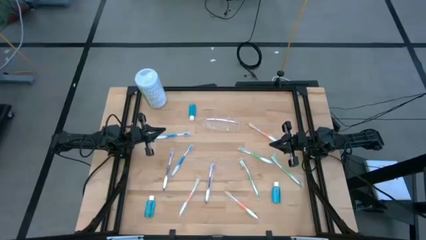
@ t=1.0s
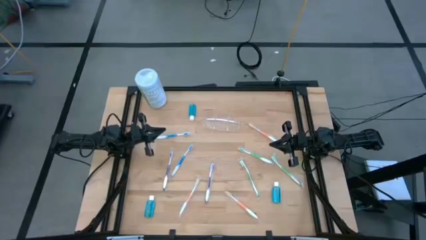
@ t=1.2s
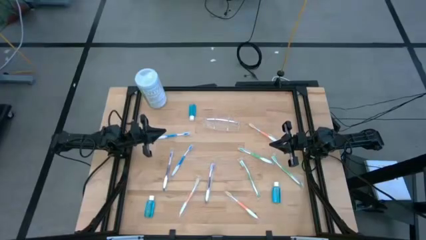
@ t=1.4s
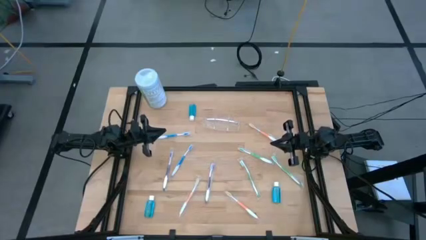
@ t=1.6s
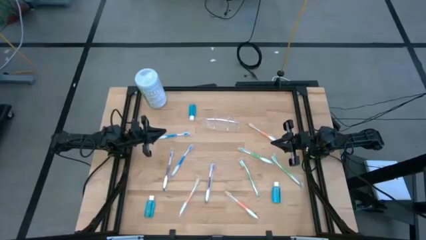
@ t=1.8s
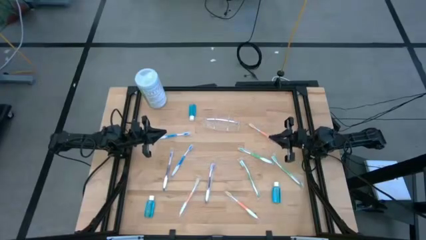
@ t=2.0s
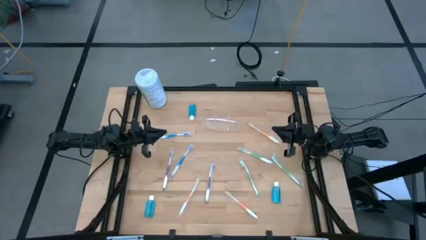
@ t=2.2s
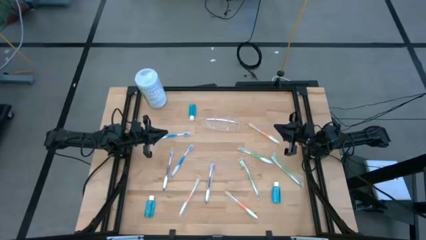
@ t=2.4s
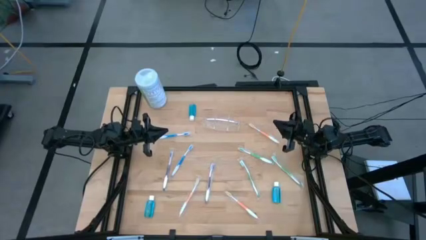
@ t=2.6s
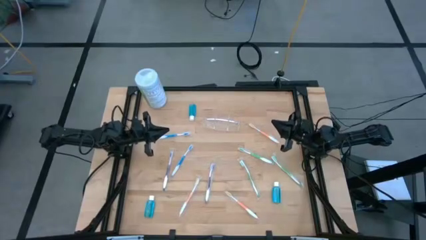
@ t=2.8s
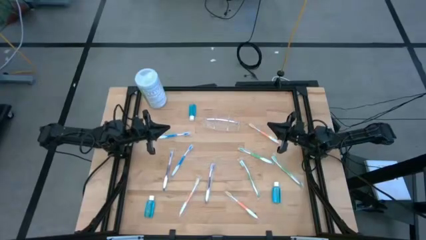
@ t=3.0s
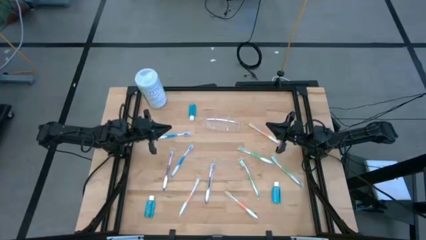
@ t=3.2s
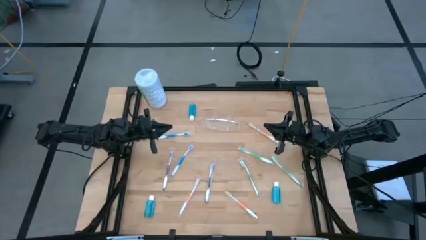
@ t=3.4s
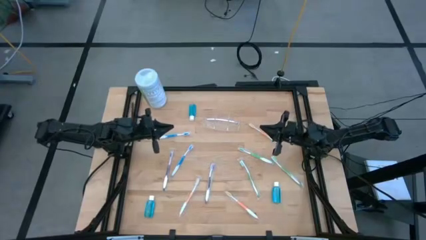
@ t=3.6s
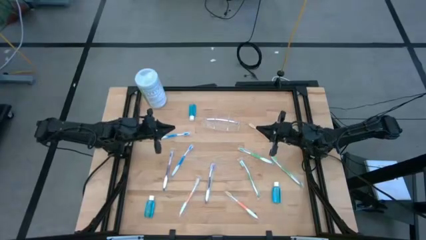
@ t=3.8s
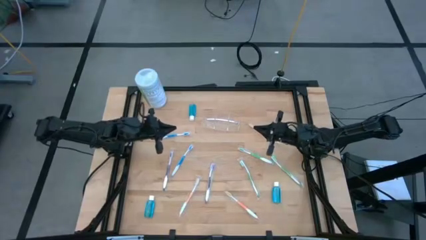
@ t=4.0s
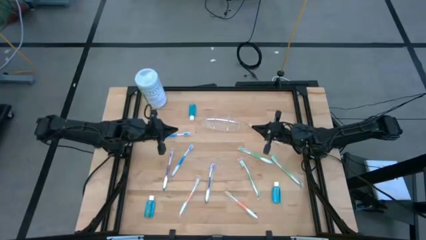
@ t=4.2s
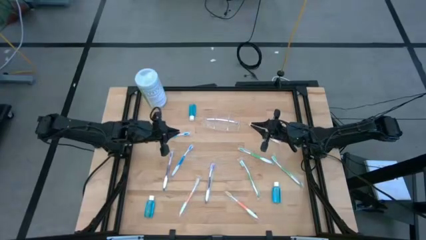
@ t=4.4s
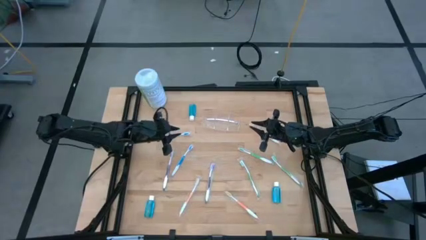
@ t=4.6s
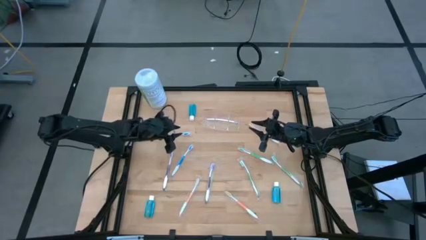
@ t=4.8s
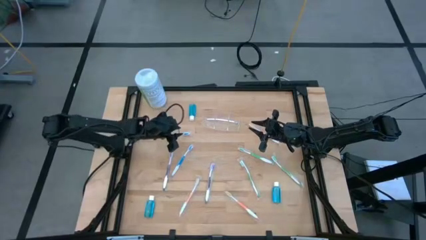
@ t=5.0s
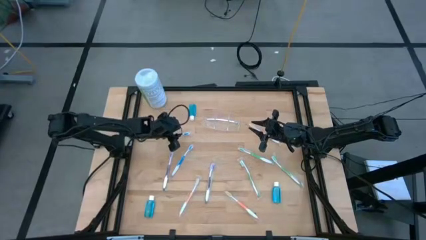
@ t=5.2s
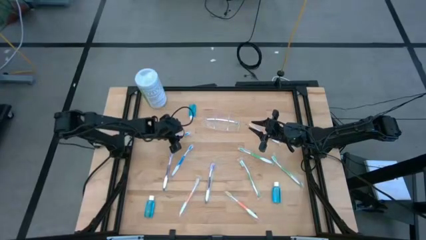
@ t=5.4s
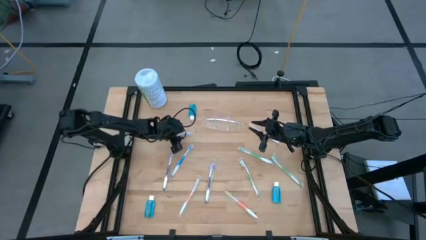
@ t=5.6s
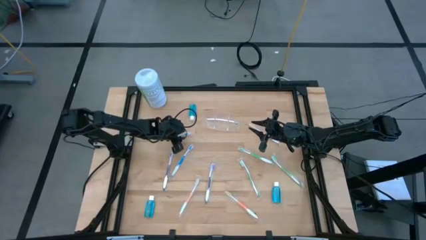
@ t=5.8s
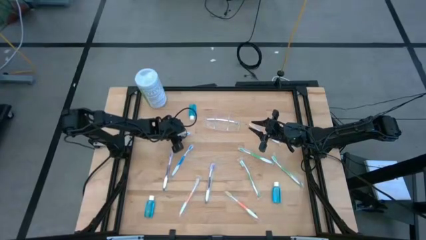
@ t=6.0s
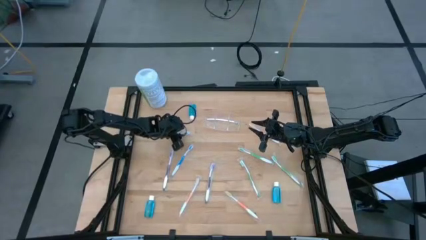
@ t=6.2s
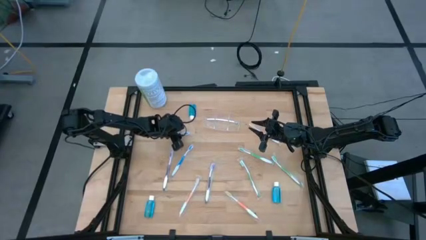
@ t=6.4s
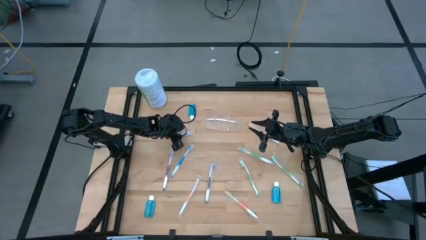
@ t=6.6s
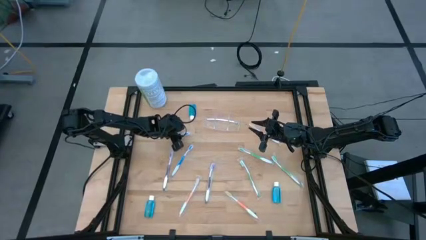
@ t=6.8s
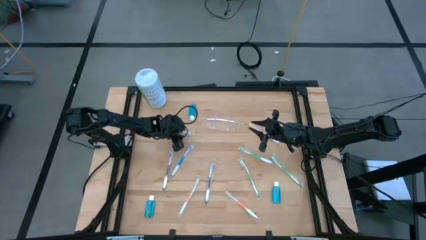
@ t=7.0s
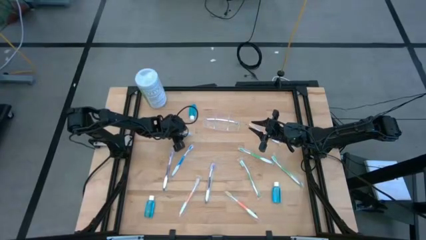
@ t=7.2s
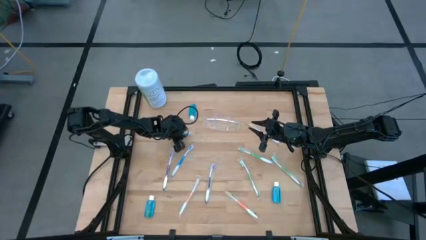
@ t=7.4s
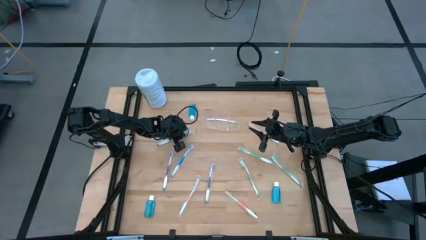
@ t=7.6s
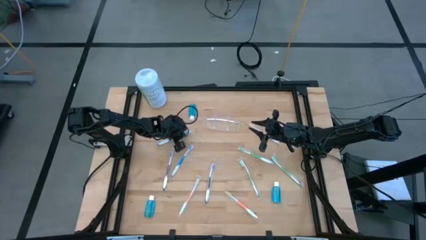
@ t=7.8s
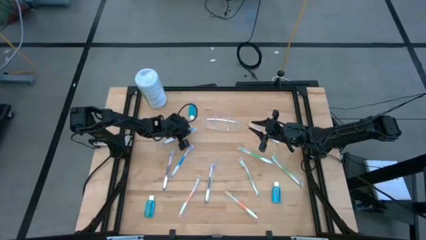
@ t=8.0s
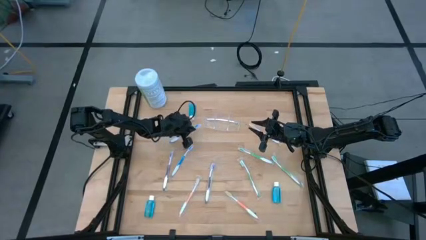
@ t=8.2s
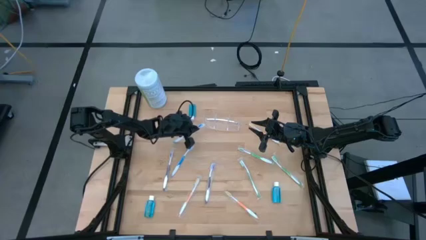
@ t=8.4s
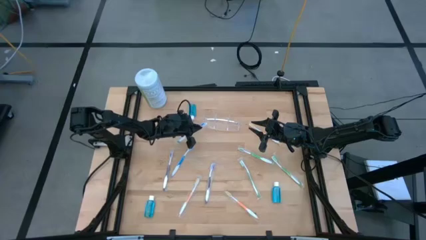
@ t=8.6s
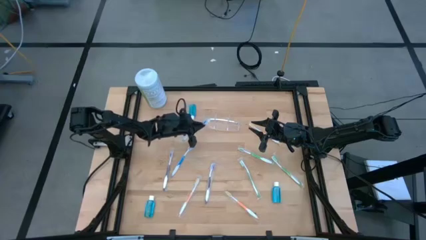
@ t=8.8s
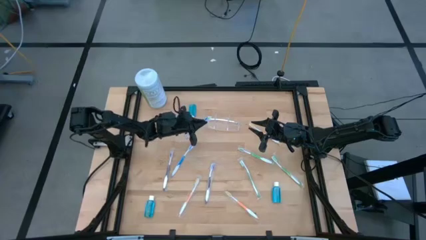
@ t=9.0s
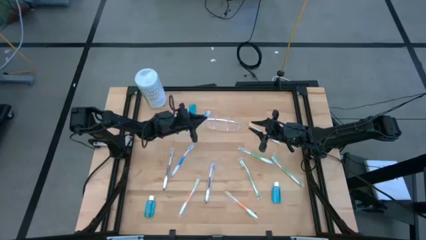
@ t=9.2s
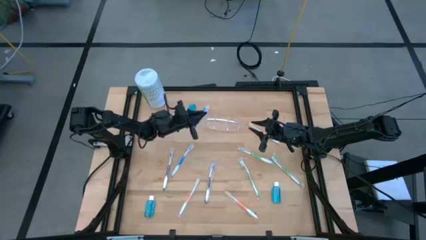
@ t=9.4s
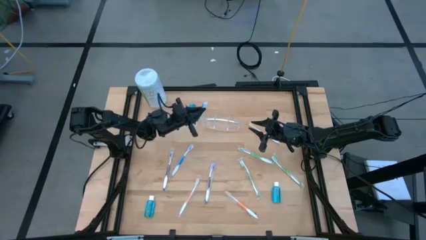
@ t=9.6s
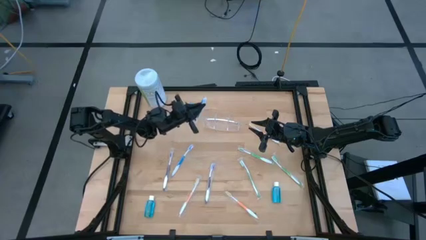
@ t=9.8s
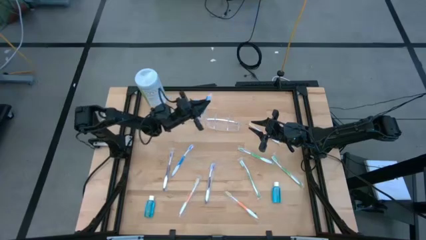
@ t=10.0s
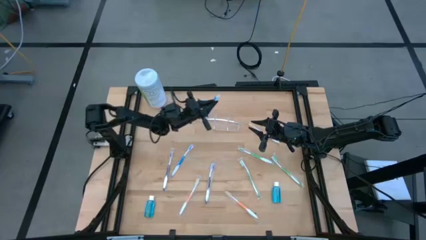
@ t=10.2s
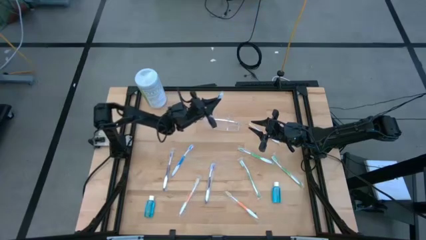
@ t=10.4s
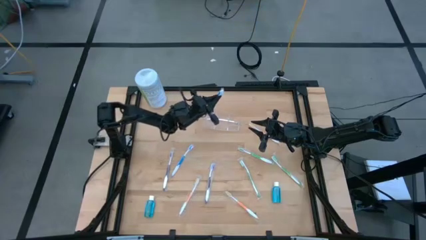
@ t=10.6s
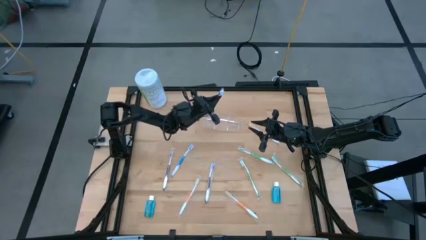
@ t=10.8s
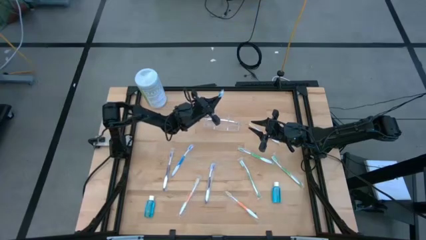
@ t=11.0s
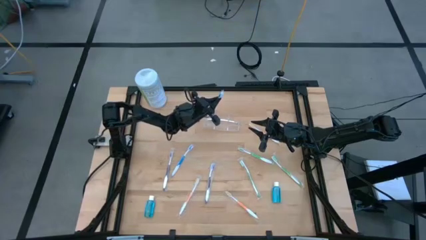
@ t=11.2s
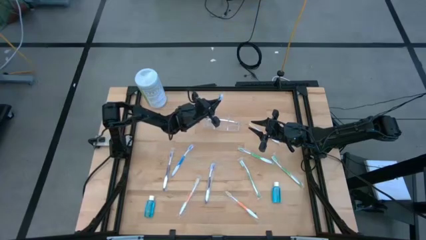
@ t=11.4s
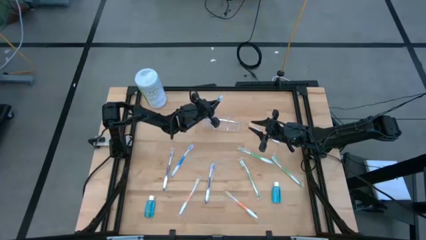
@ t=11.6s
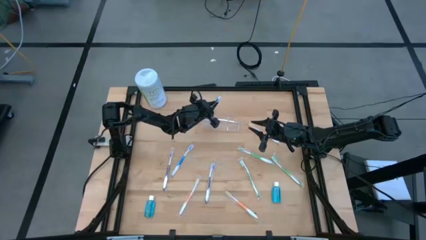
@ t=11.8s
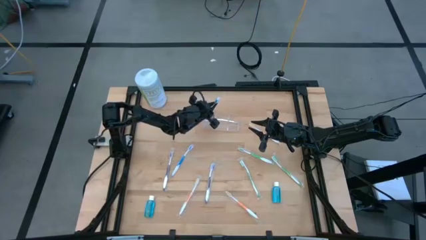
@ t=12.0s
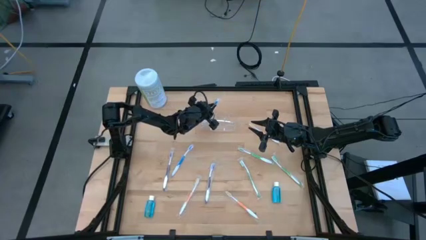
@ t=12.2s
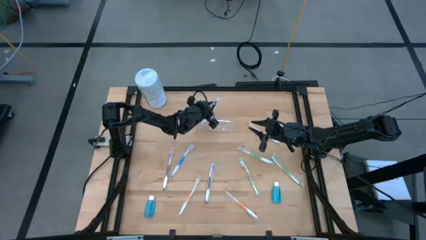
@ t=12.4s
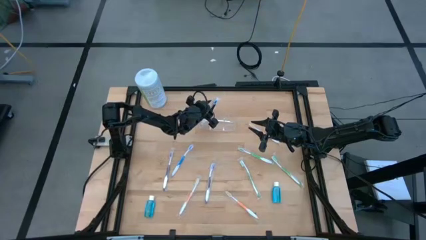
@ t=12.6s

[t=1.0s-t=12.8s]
Task: Pick & Place toothbrushing station
Put the top blue toothbrush into the transparent organizer

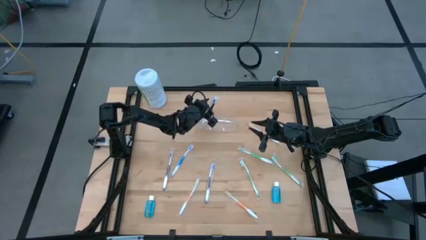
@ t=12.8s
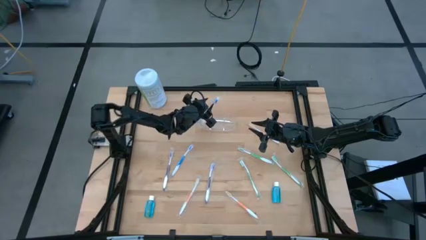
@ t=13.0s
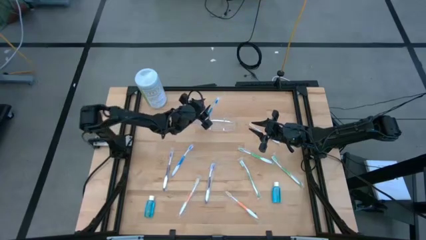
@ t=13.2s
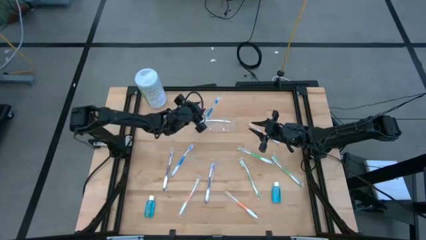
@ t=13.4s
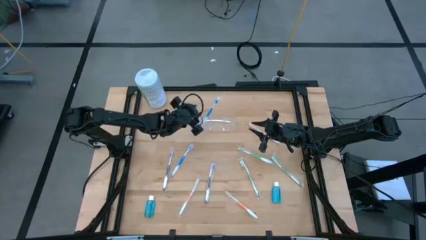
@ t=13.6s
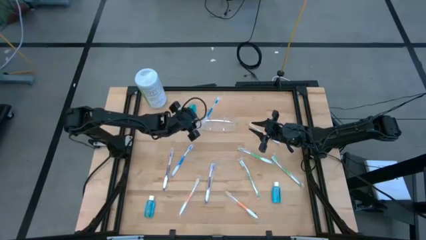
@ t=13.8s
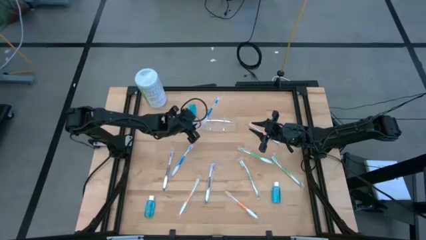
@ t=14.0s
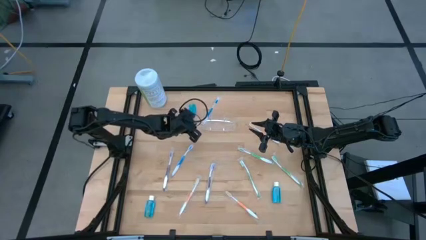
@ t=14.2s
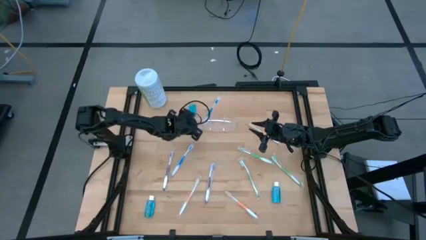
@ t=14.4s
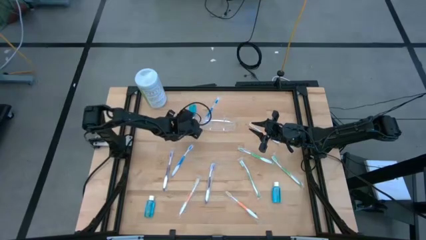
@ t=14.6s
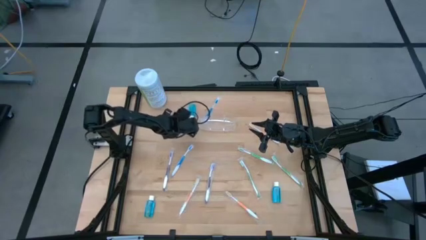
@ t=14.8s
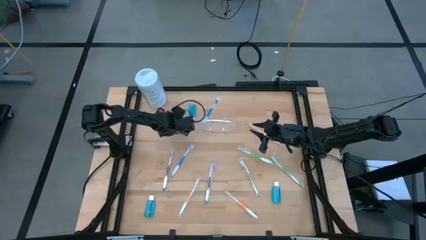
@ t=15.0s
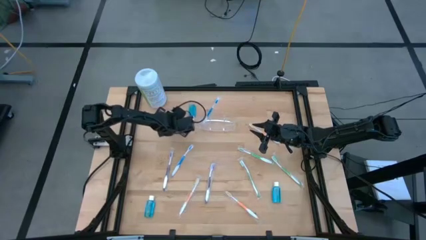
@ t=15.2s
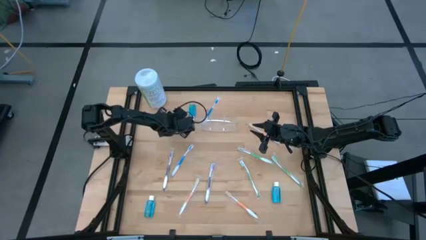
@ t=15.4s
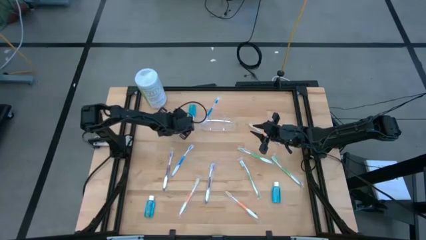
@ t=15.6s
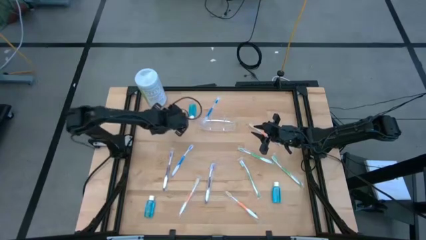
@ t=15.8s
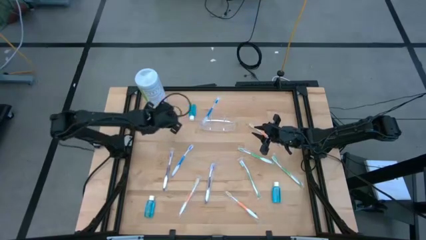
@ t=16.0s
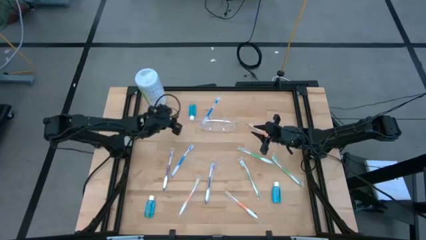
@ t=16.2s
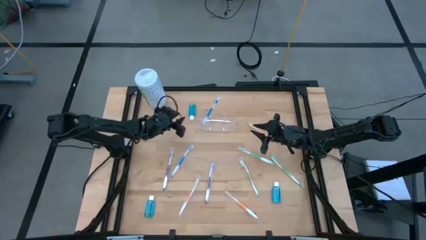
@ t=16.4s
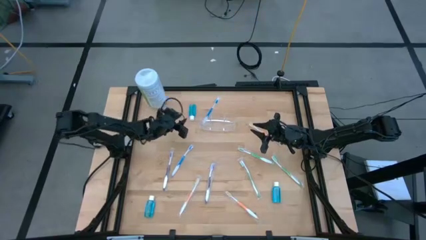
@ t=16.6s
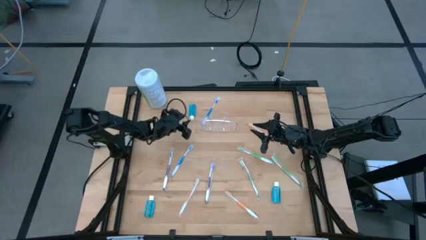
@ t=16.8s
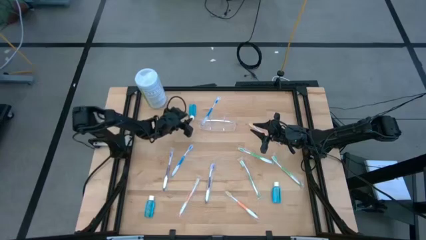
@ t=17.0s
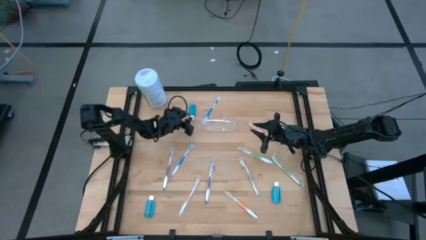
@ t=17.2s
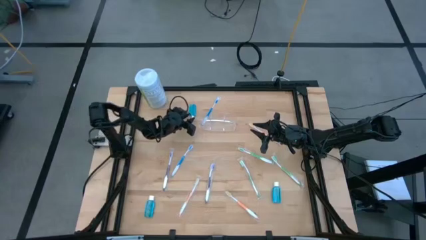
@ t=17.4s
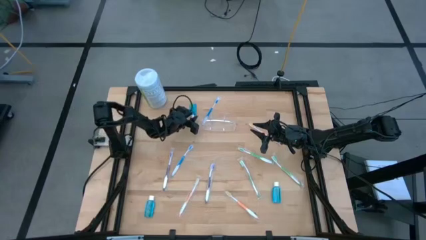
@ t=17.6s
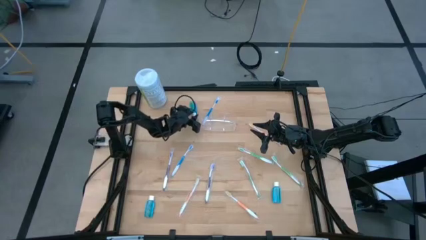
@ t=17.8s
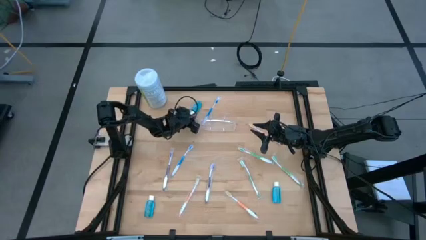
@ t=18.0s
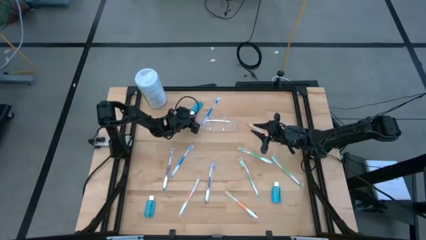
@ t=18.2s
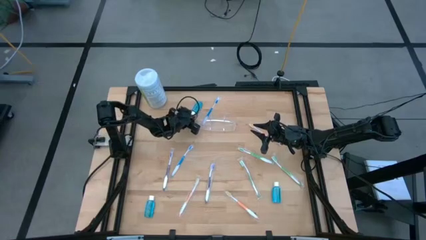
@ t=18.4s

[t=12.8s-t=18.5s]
Put the top blue mouthwash bottle into the transparent organizer
